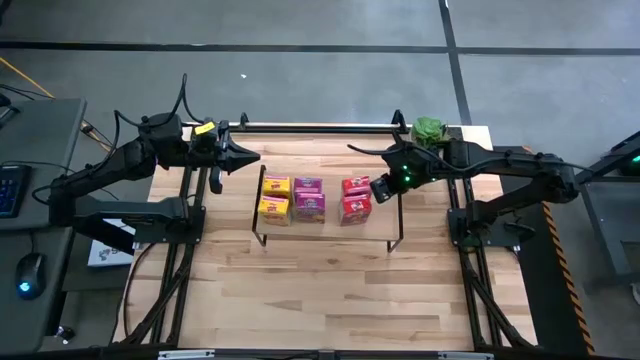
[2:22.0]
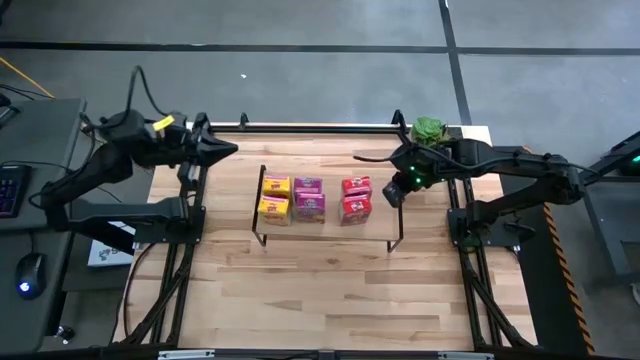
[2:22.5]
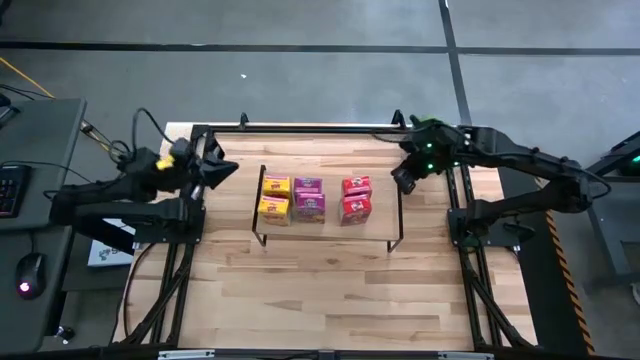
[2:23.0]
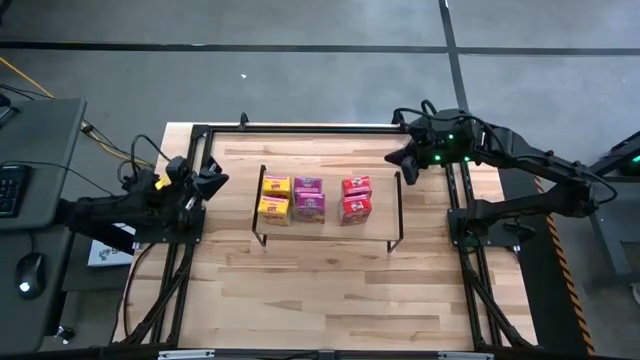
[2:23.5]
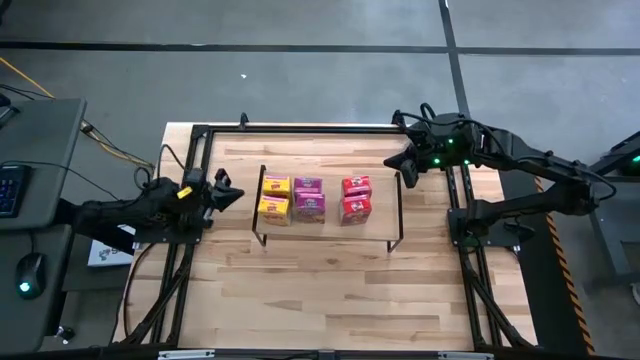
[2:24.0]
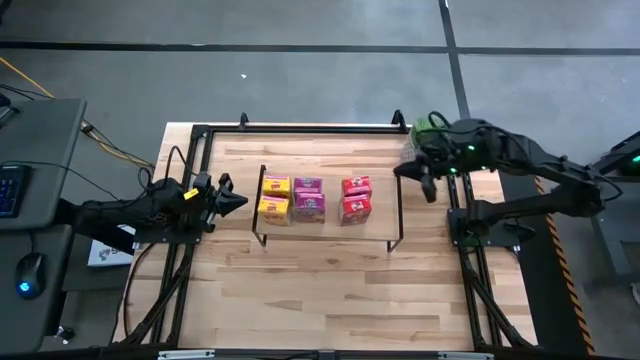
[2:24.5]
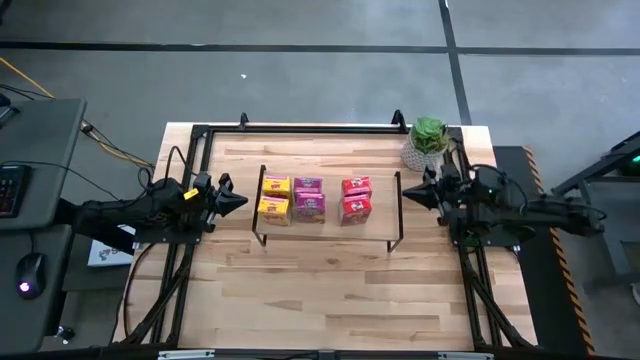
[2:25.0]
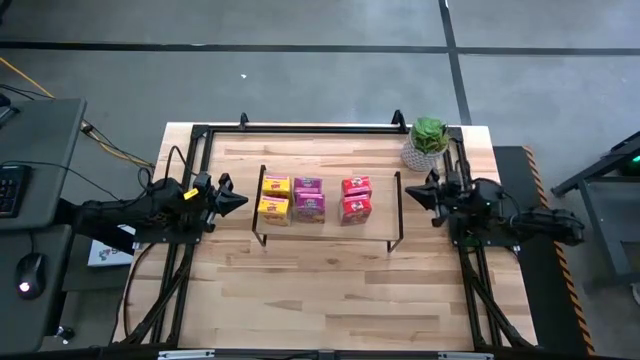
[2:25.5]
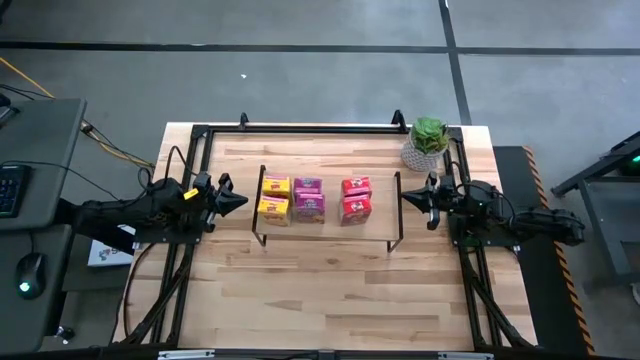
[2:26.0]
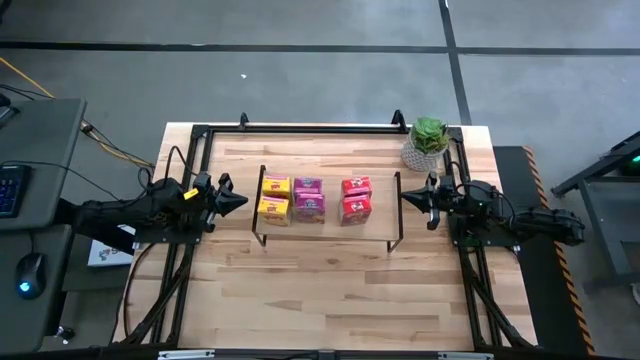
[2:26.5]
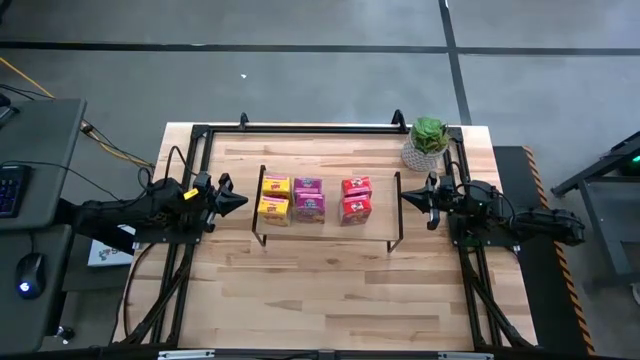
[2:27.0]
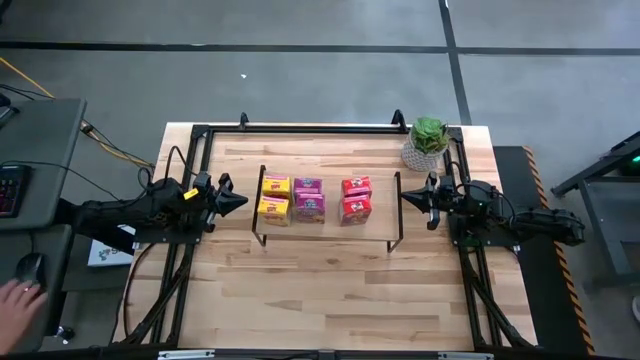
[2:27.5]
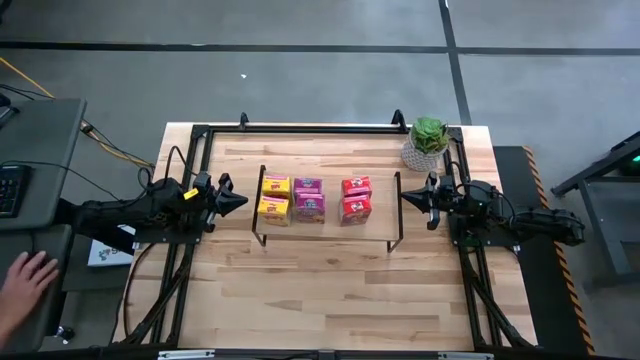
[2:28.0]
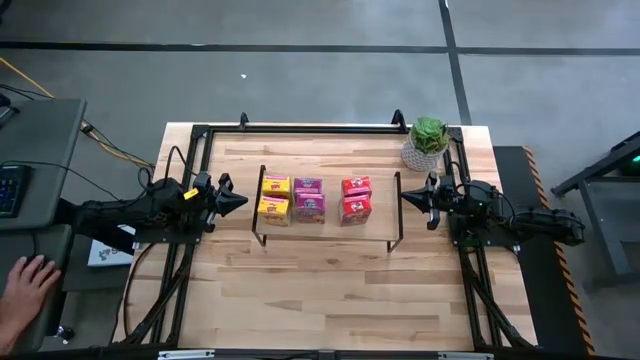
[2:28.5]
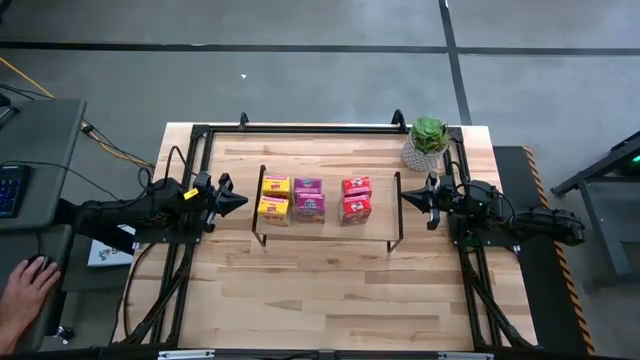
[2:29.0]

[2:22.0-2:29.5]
Task: Stack cereal on shelf
Return to Home Position

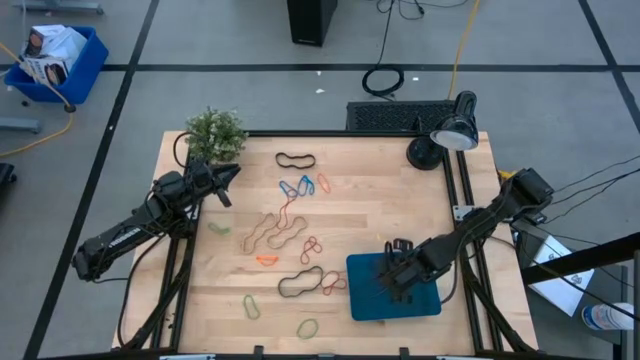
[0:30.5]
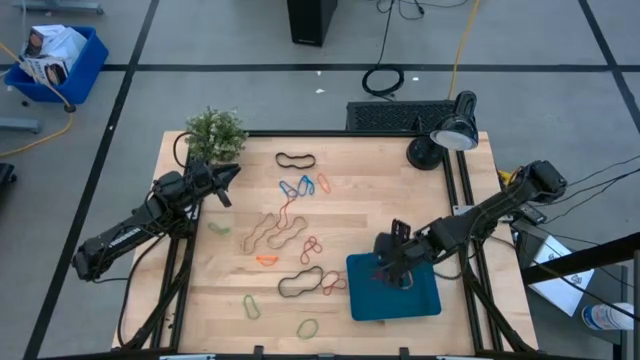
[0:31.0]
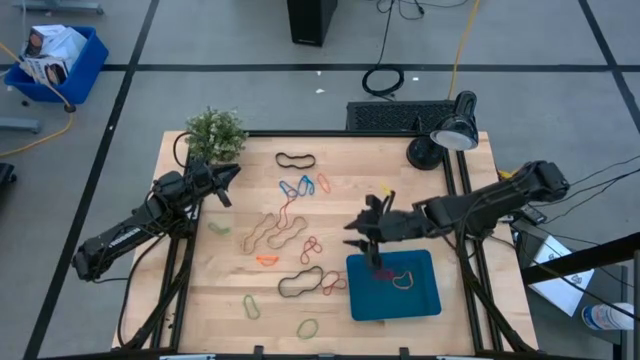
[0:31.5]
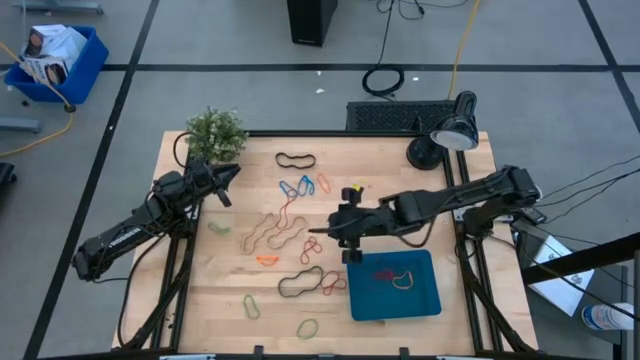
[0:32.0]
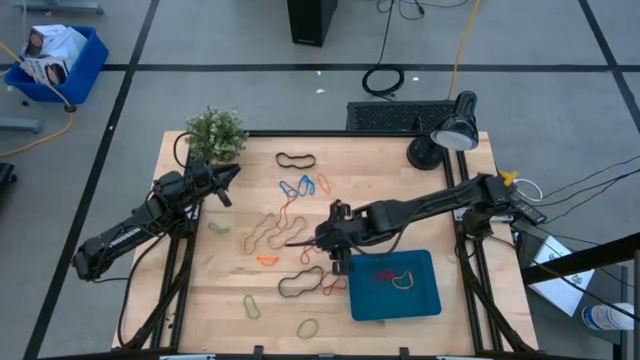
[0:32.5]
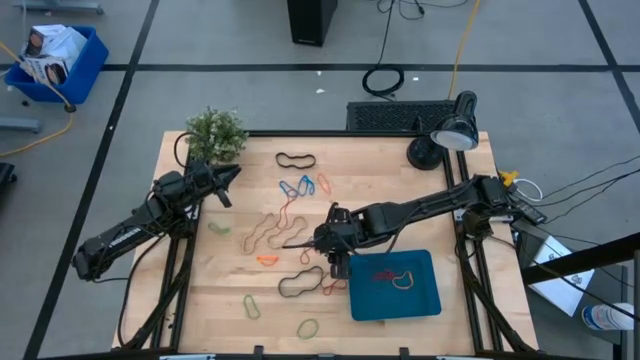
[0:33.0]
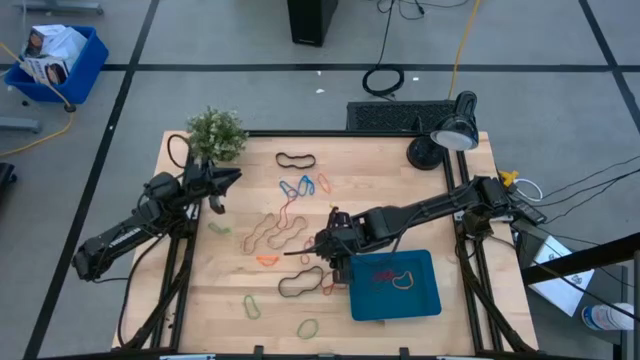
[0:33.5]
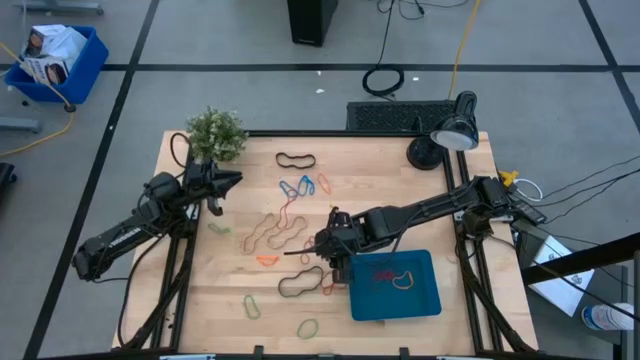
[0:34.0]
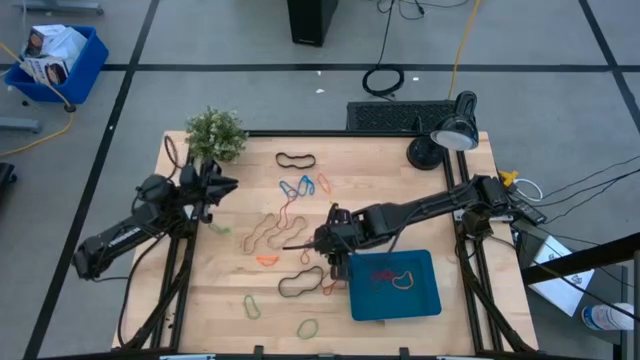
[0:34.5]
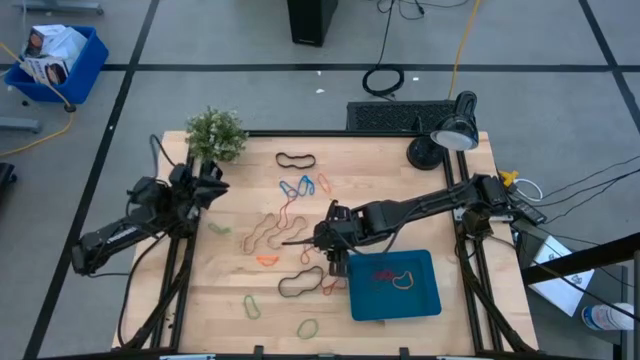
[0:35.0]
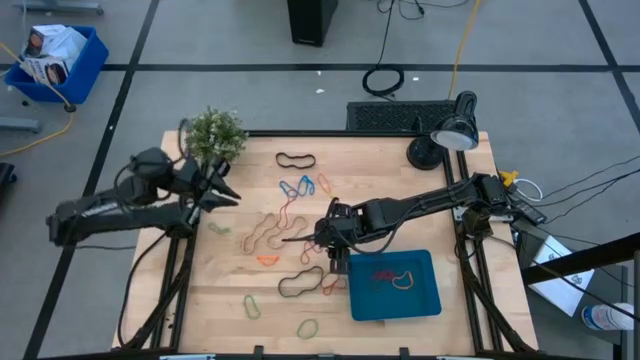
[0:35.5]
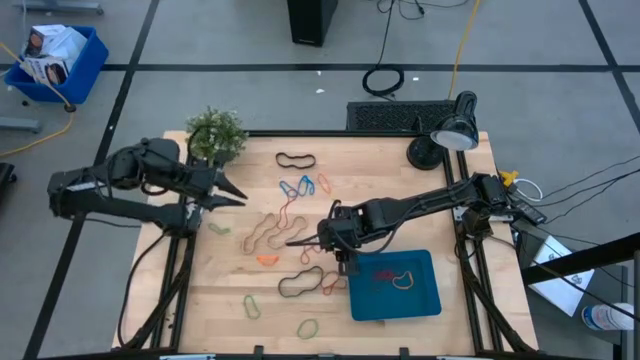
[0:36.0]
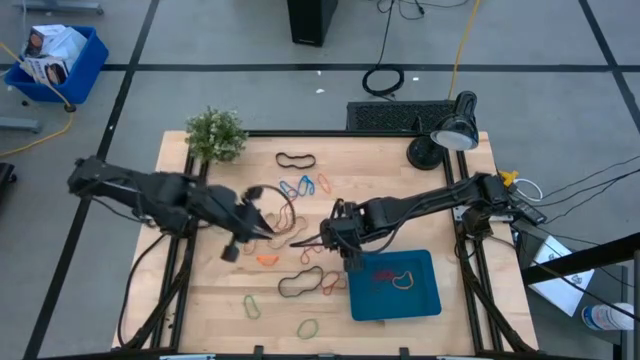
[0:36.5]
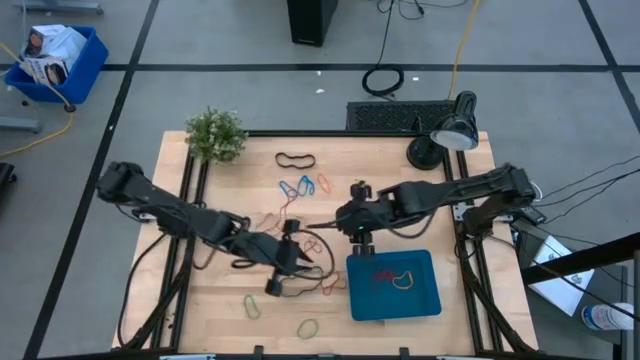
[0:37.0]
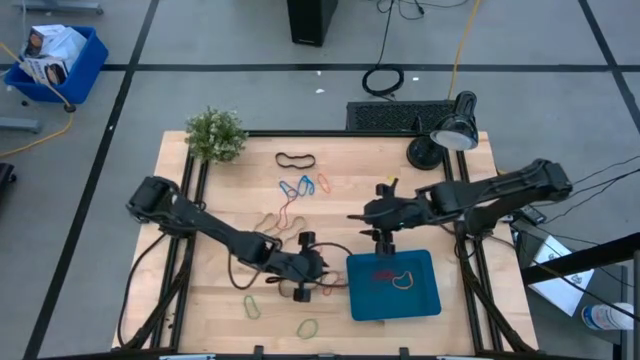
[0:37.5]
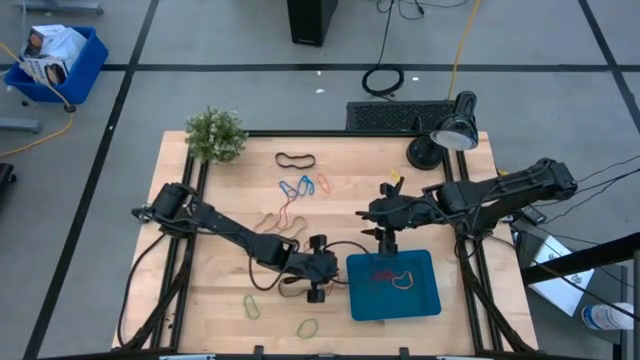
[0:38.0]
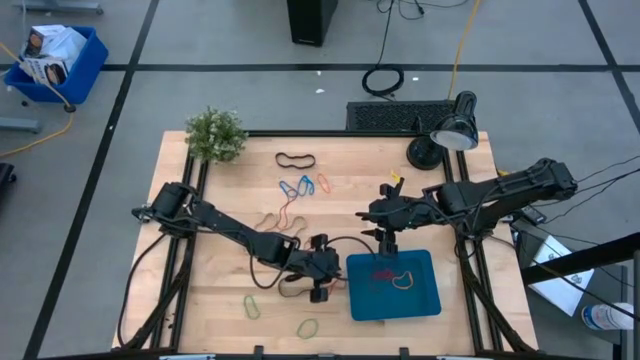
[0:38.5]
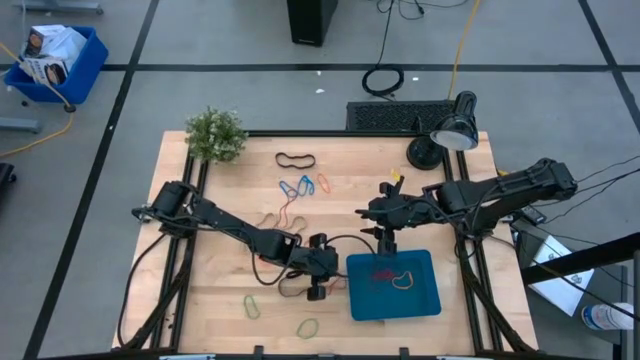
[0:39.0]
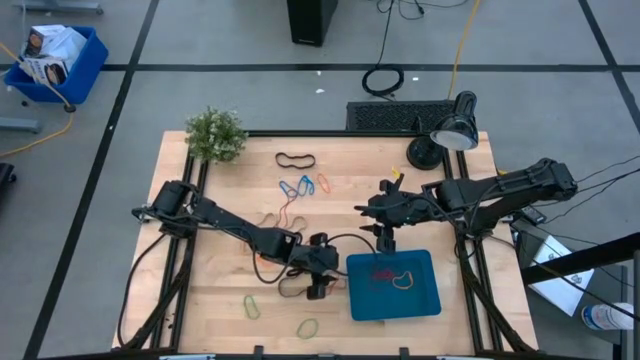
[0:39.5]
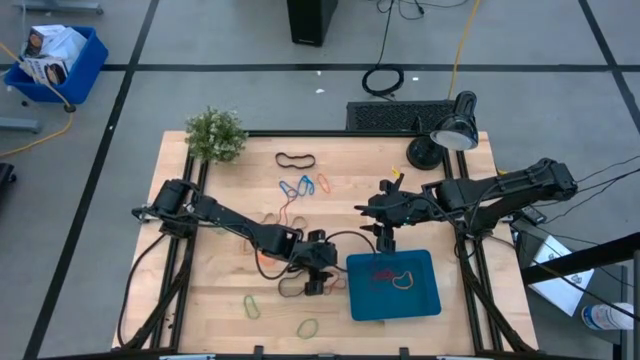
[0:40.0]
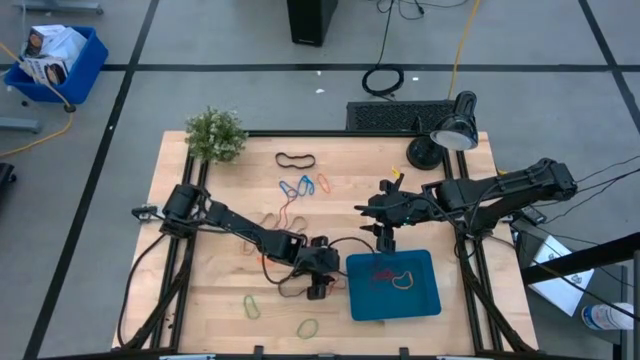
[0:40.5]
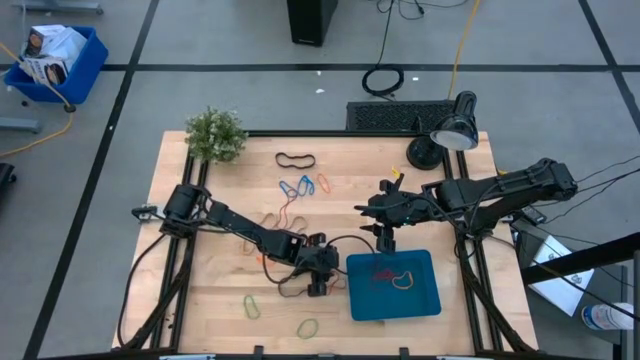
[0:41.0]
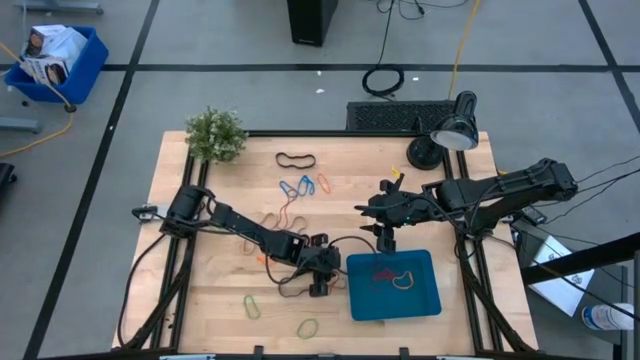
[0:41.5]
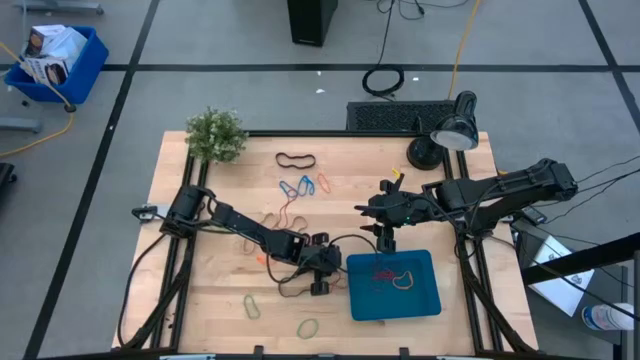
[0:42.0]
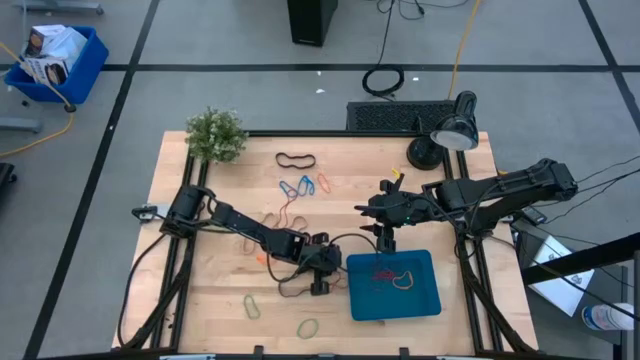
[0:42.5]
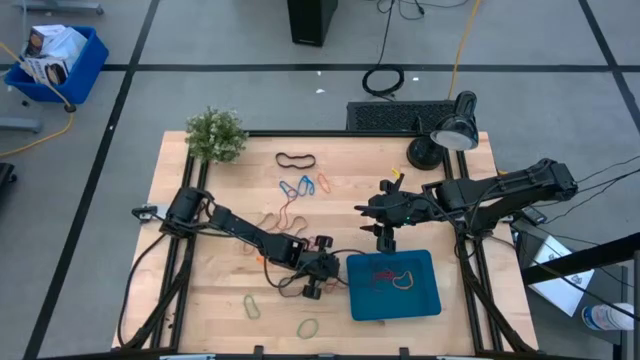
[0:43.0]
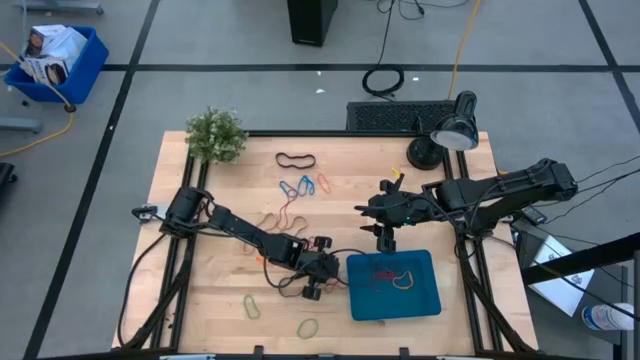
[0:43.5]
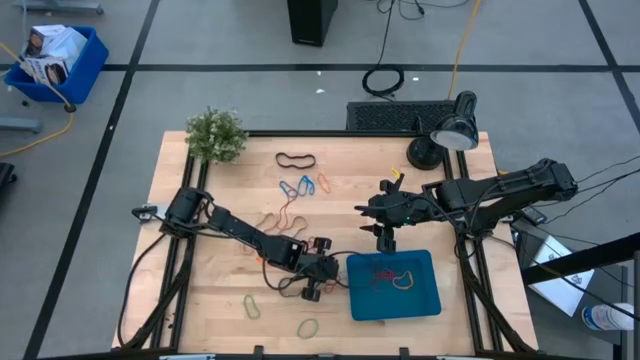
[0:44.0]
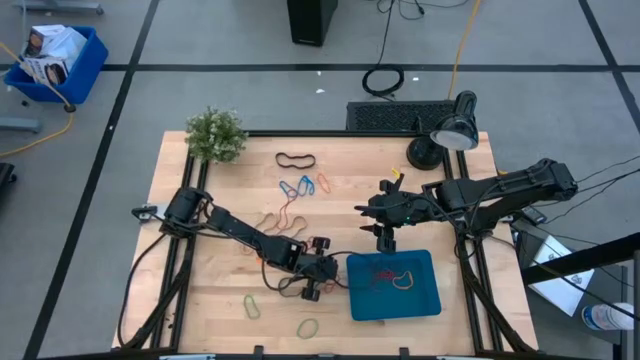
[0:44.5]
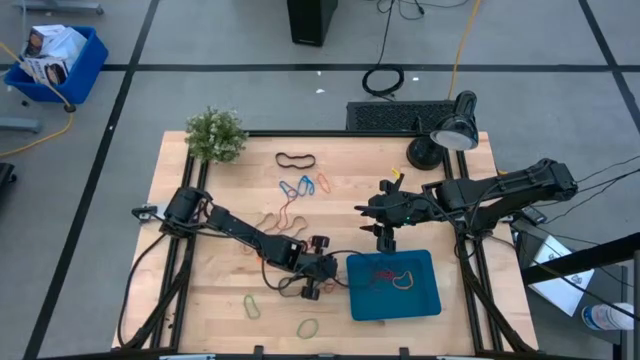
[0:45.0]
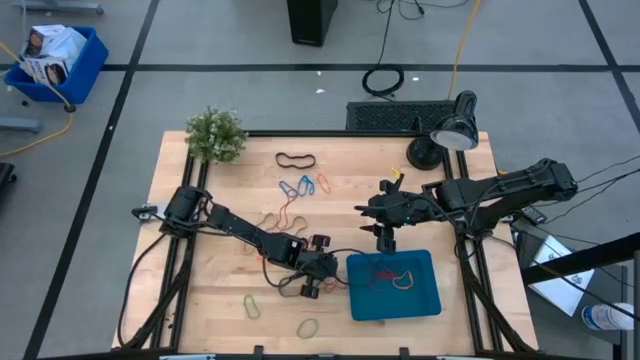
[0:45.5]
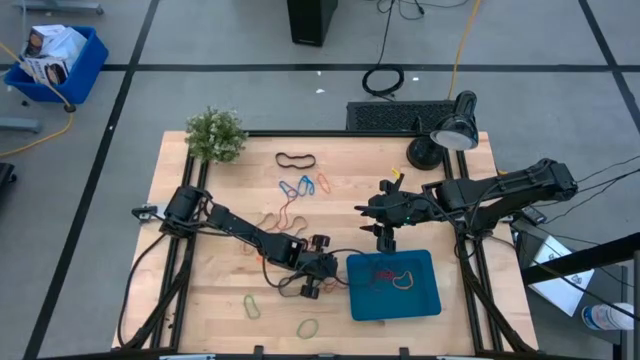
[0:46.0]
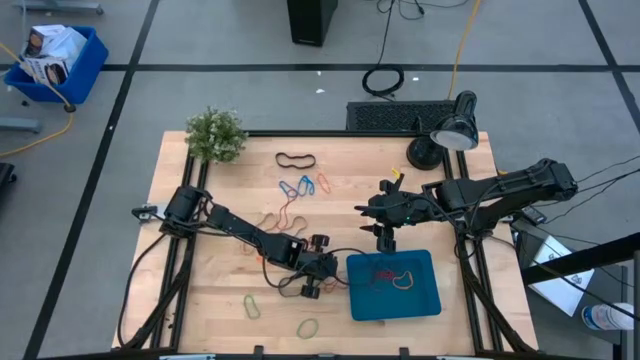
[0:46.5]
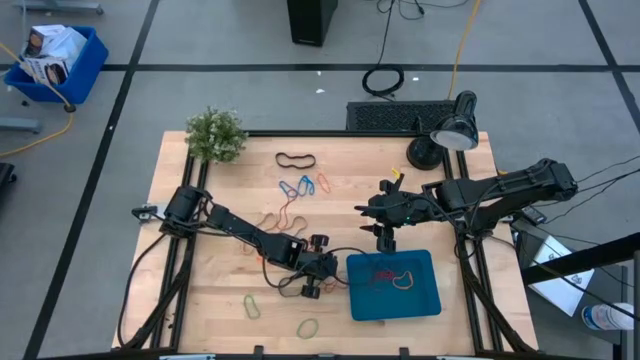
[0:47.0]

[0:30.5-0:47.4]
Task: Pick and place rubber bands into bin
Put the red rubber band into the blue bin
